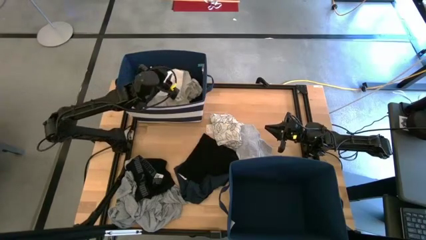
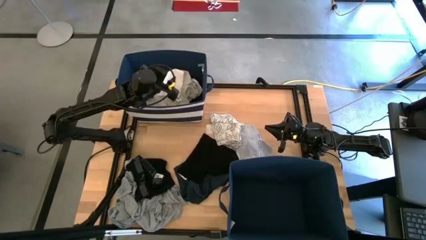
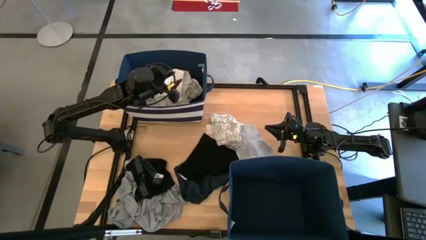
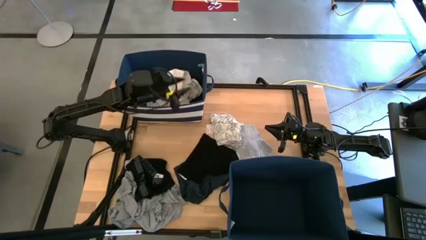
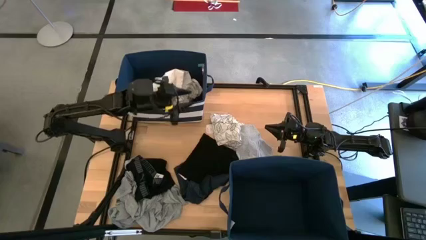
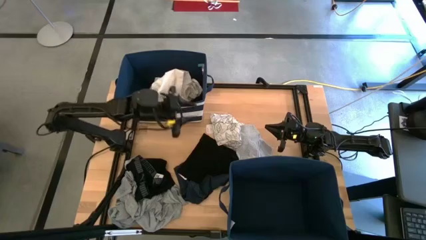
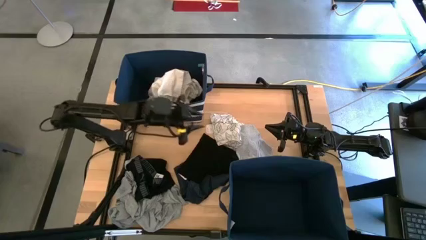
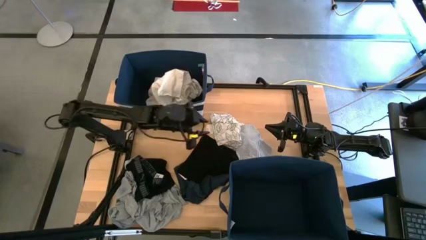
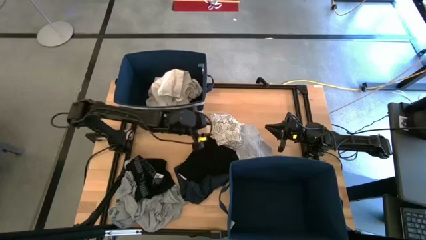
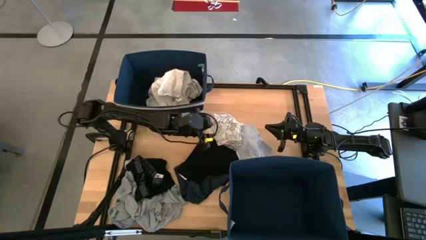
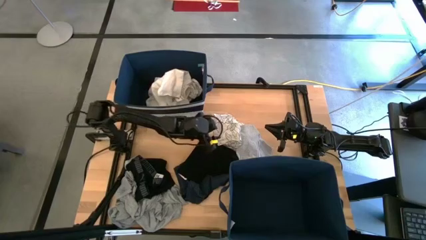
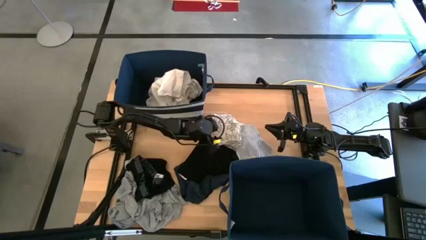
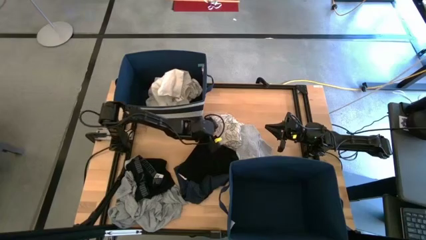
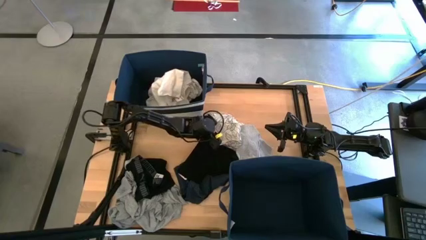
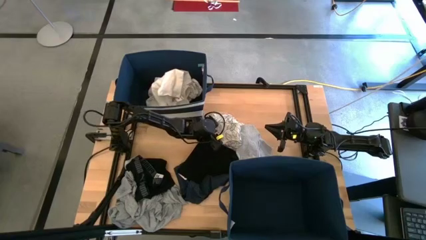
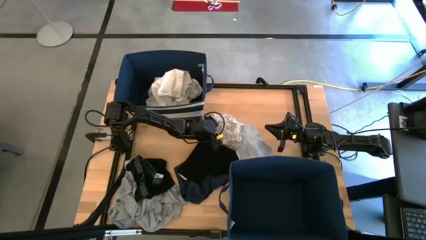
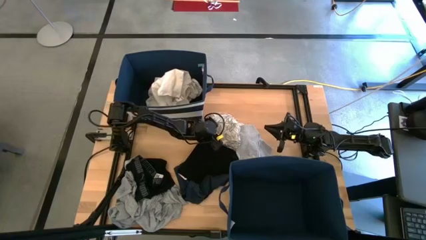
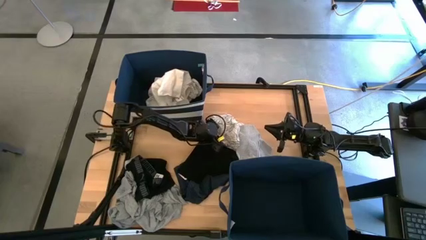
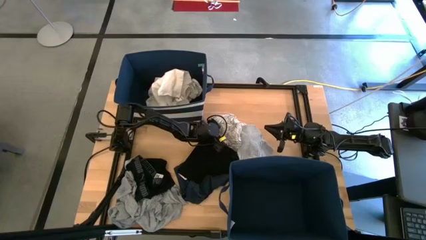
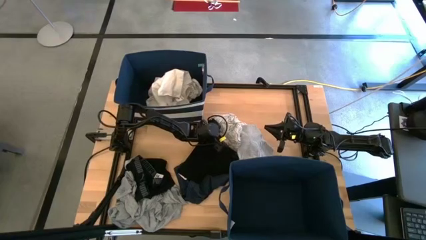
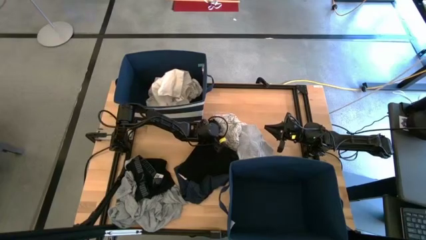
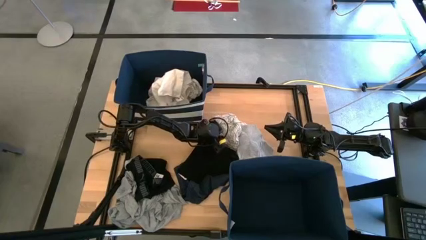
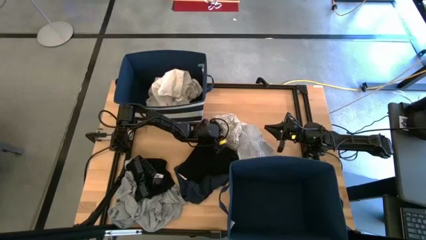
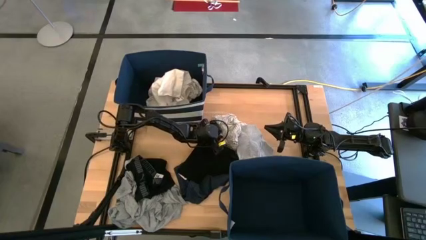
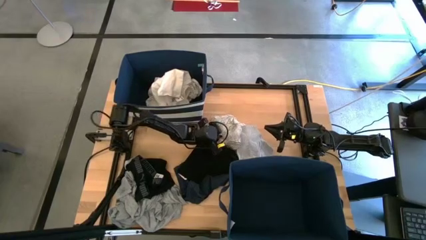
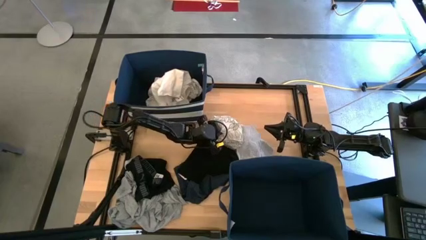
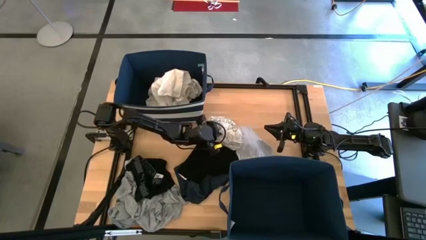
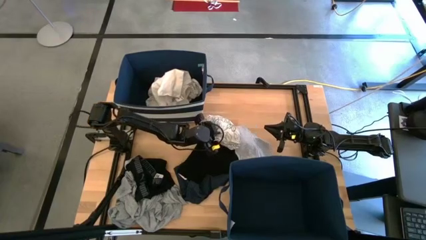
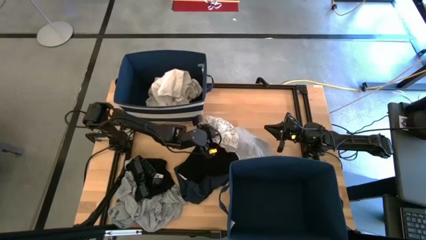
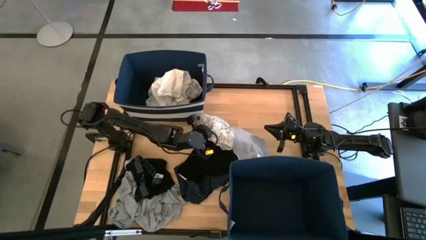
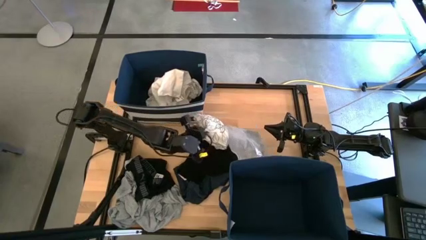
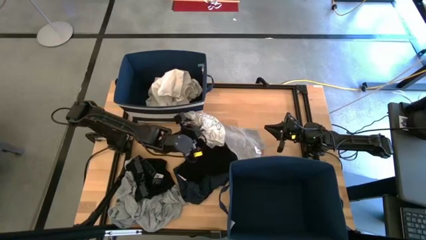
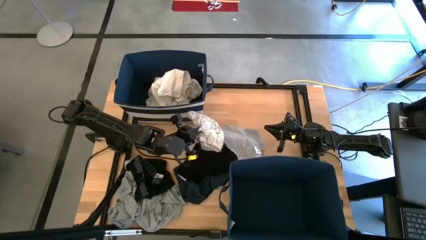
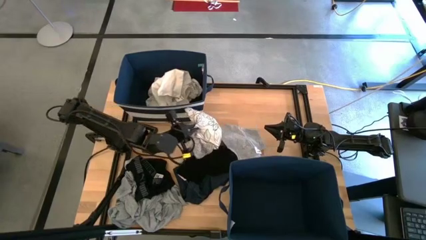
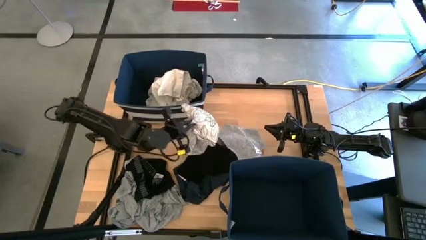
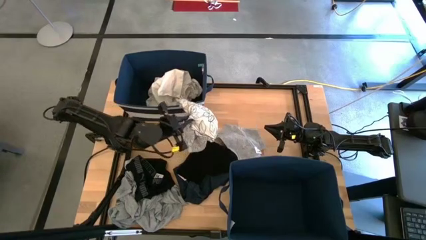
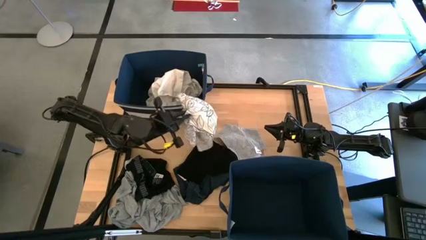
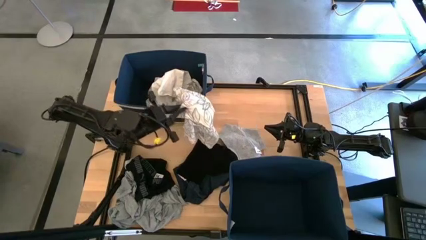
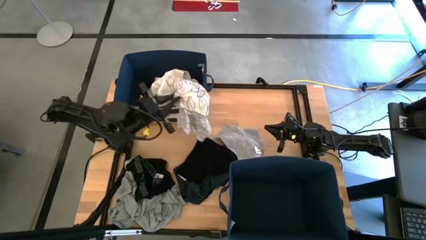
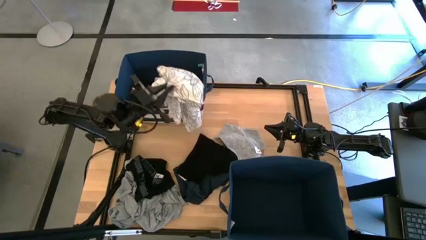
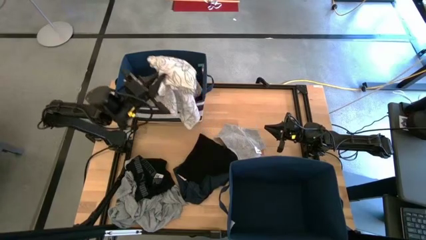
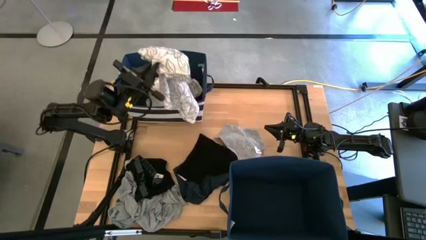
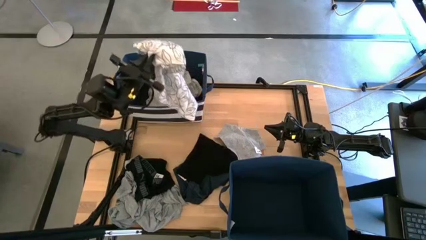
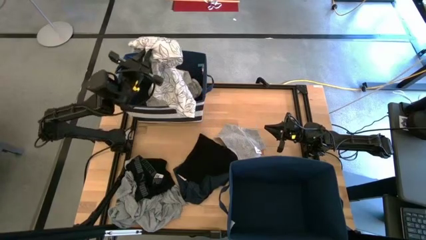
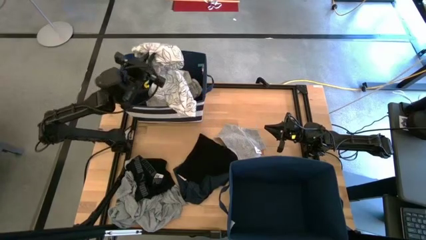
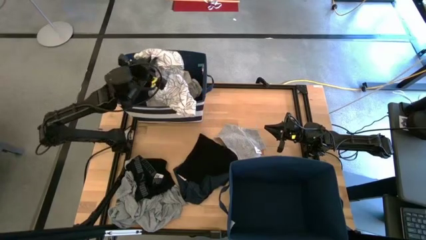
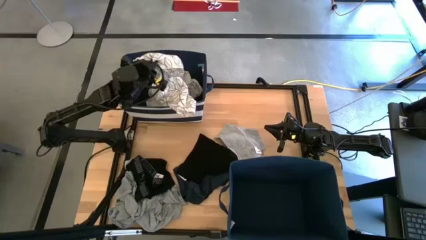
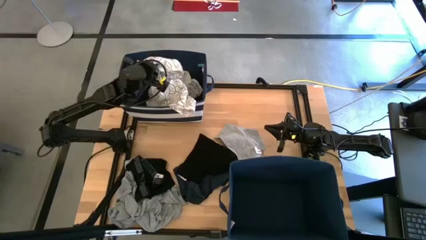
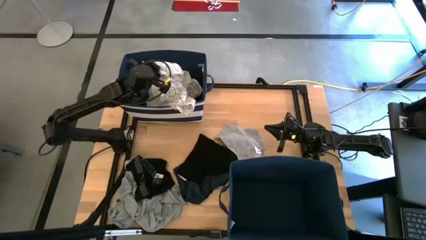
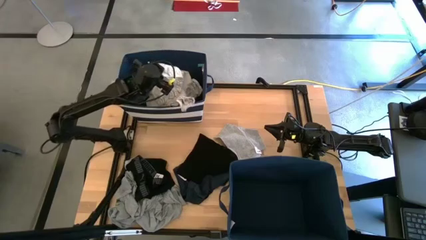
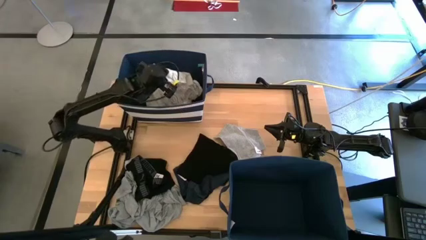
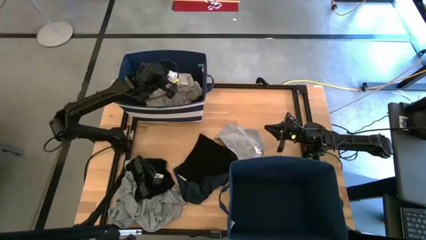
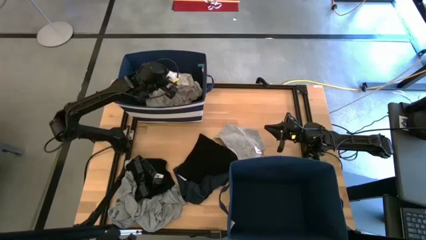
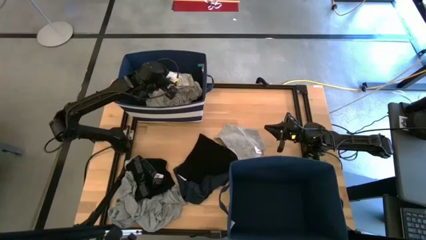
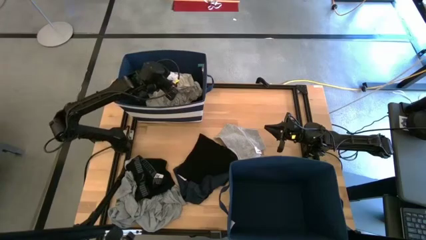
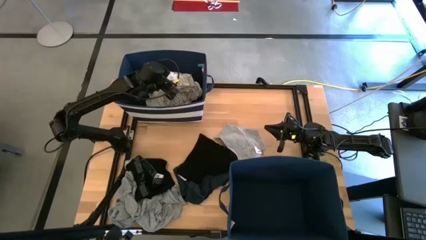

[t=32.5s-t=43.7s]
Task: Sort clothes
Put the white patterned towel into the top blue laundry organizer

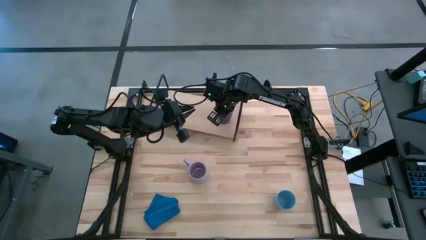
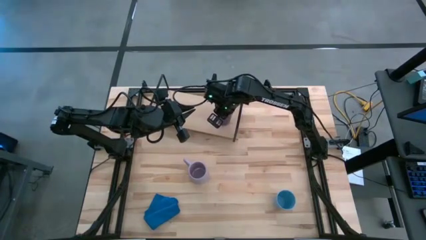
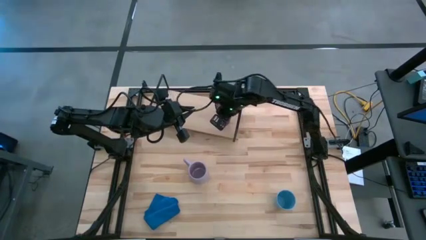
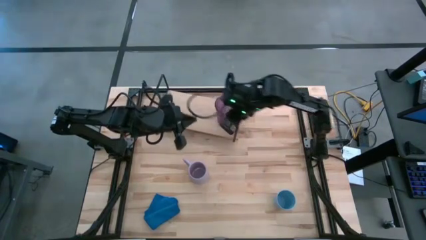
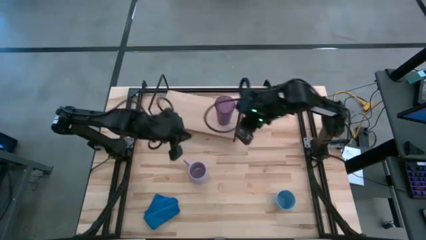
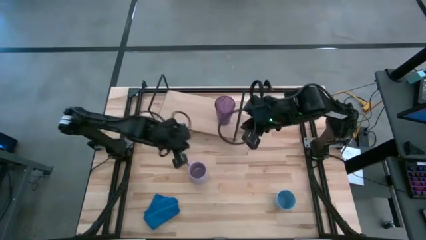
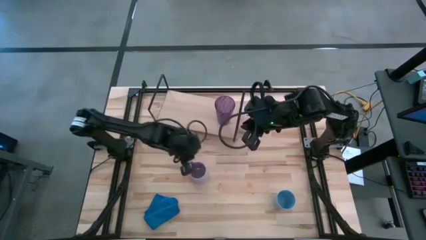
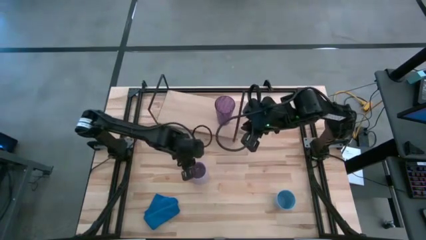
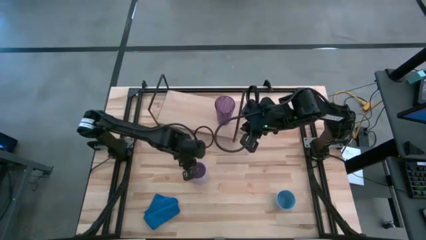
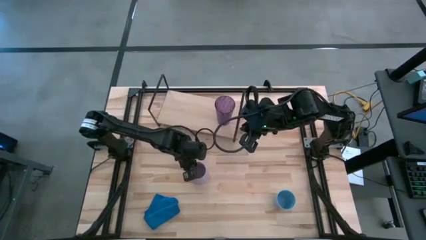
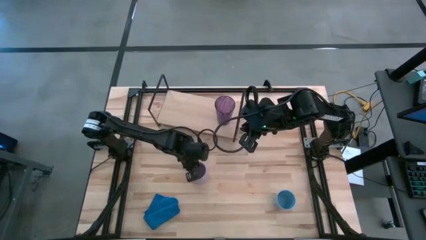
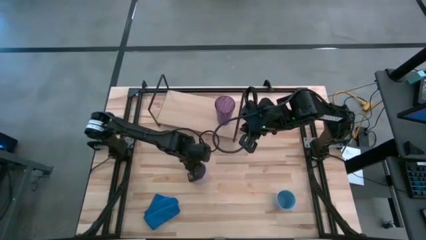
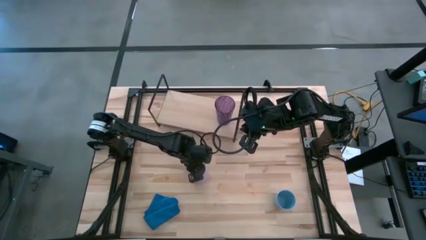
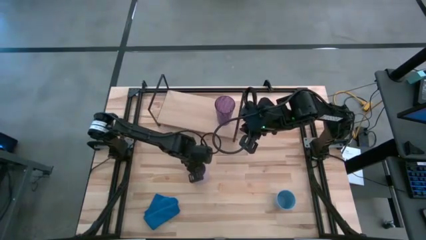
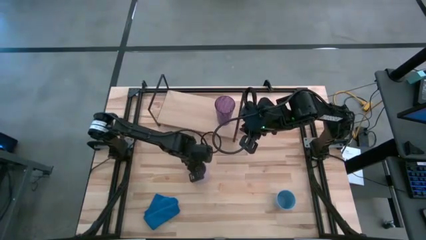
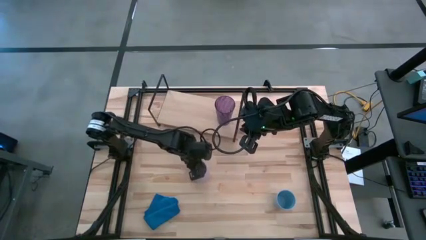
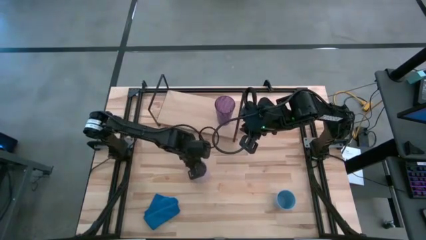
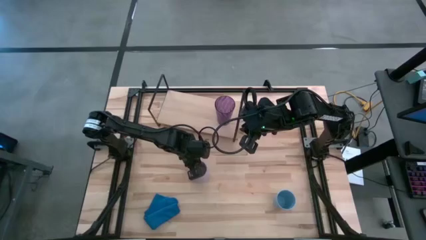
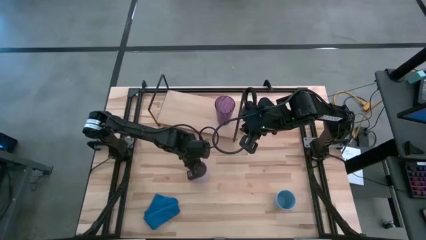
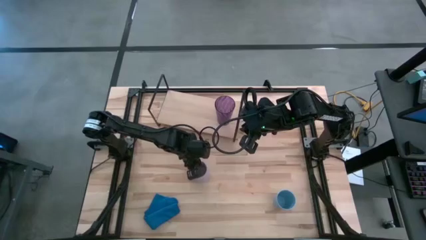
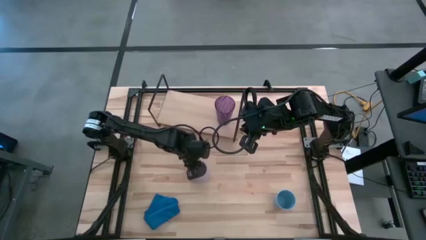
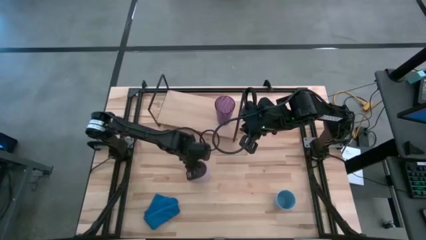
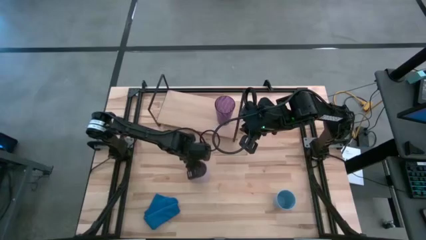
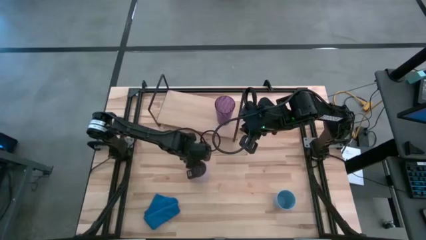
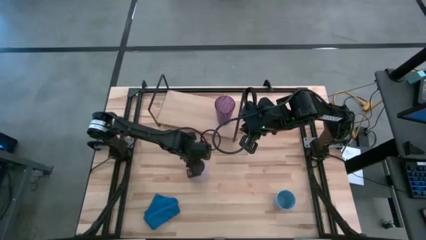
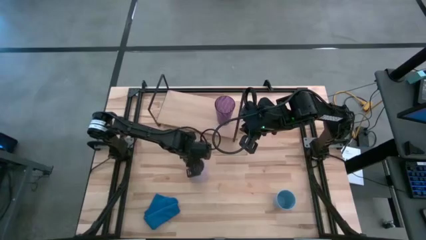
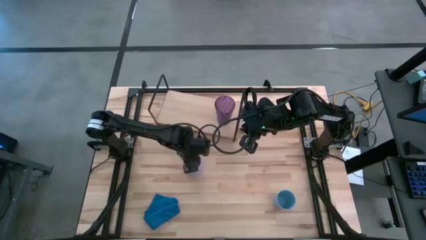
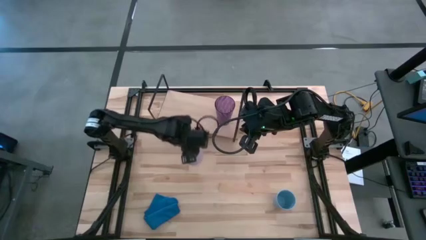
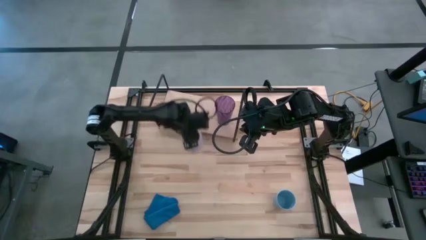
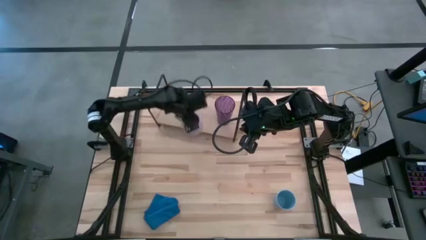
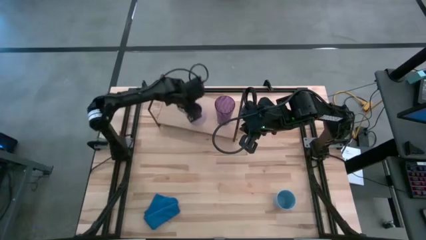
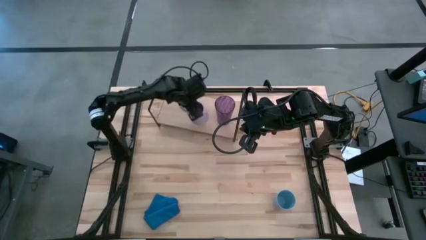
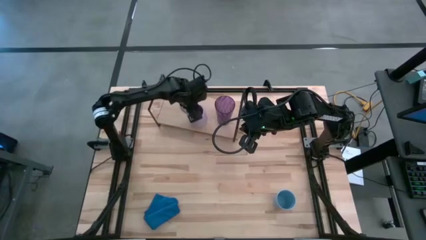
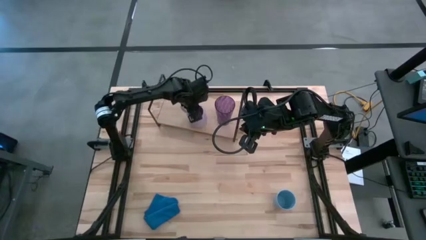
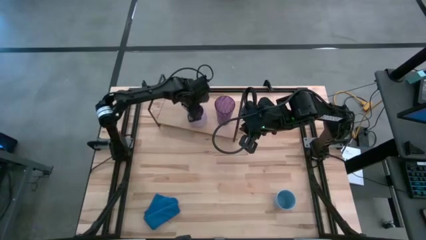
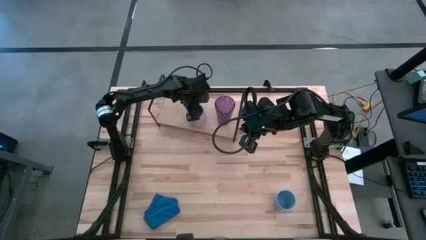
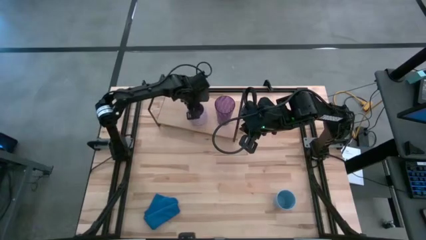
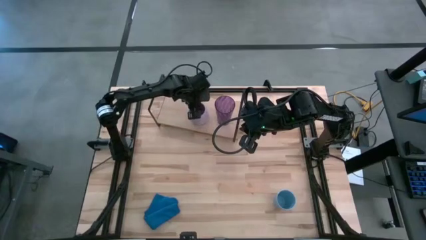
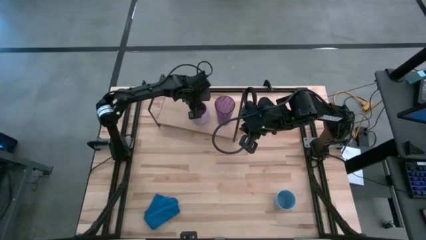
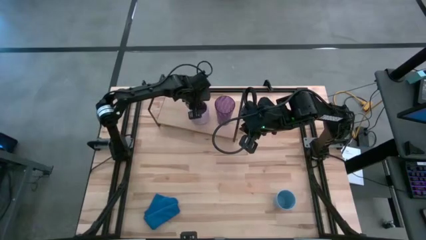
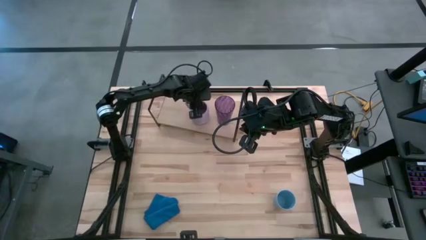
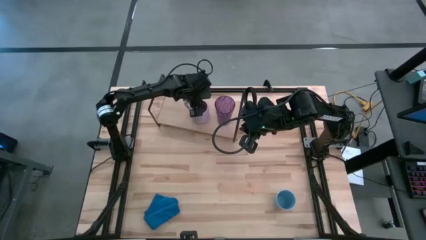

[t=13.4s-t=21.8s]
Task: Stack small to large cups/mugs on shelf
Put the purple cup on the shelf
